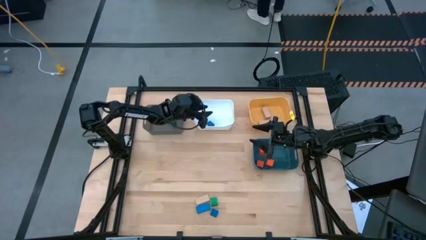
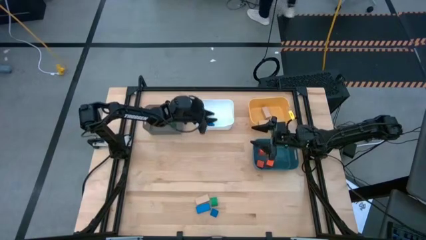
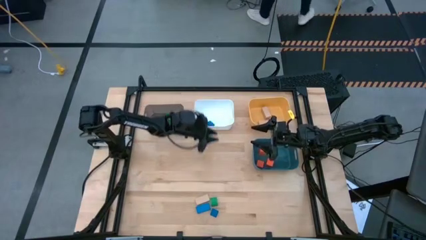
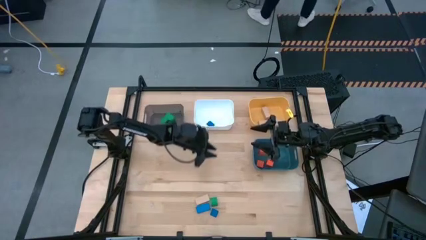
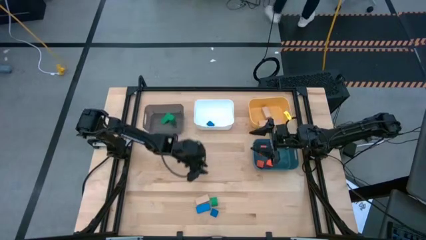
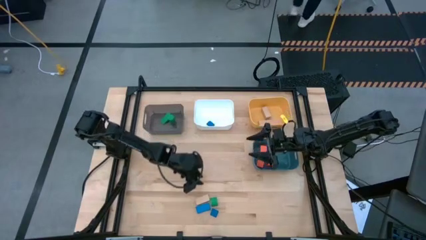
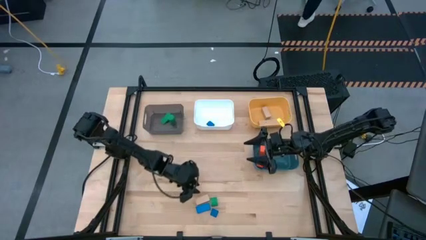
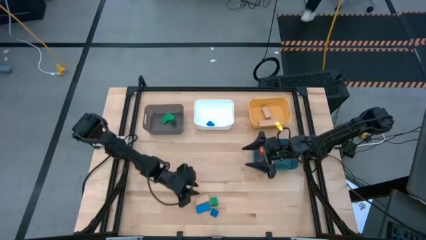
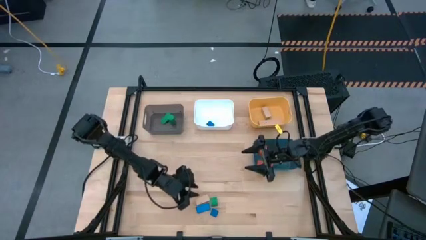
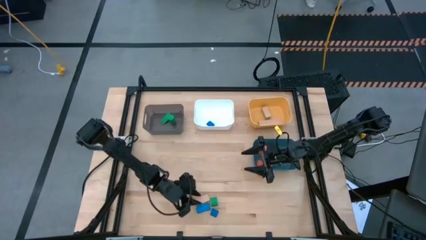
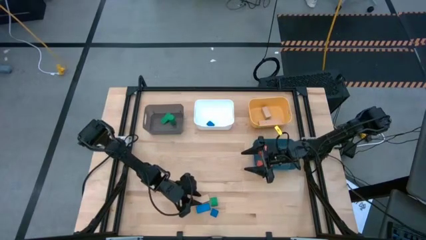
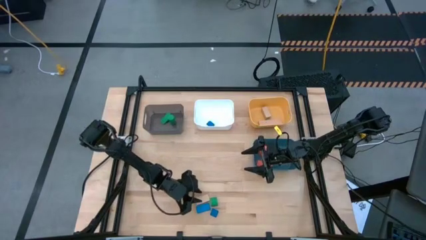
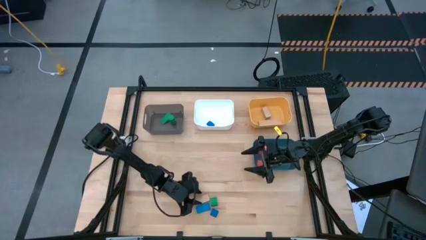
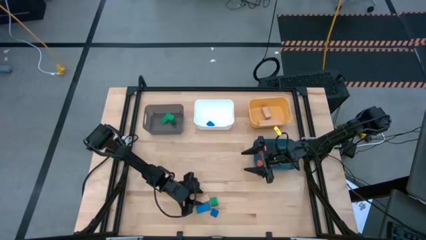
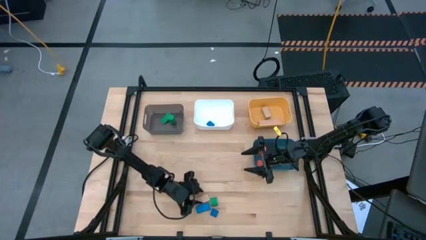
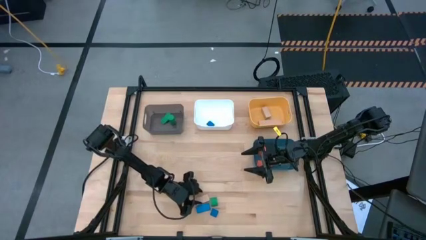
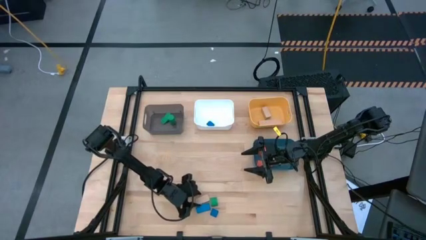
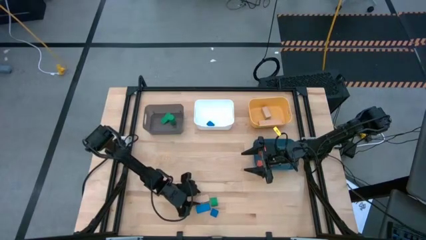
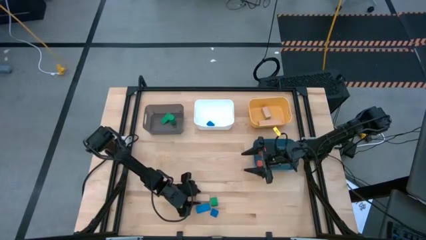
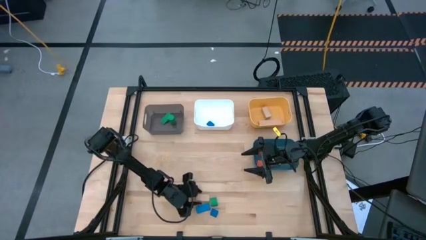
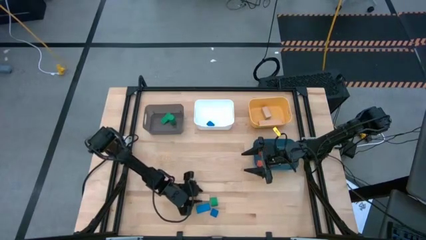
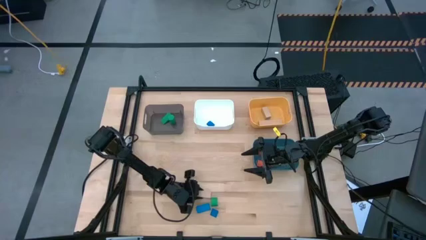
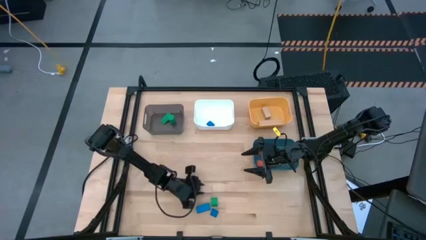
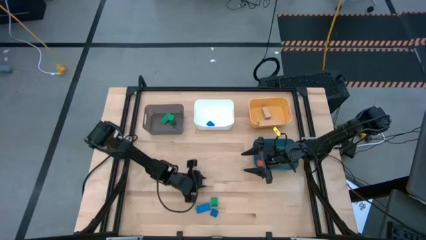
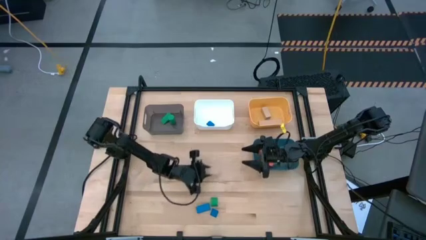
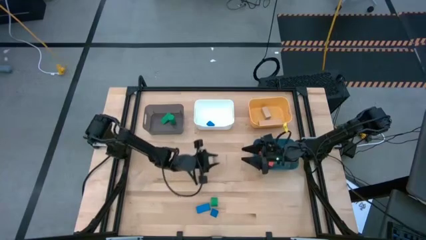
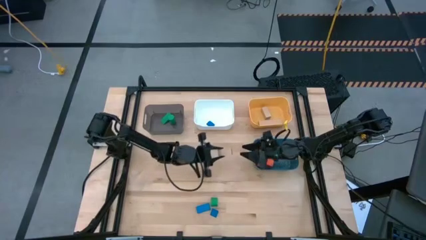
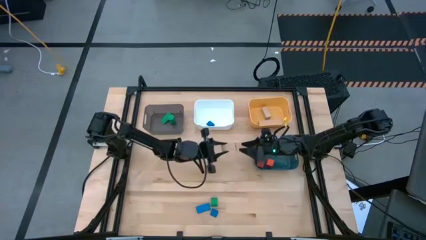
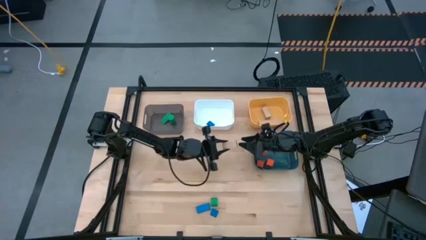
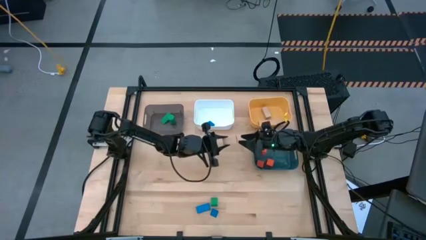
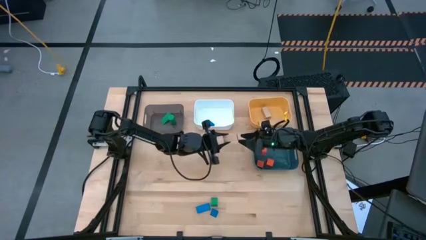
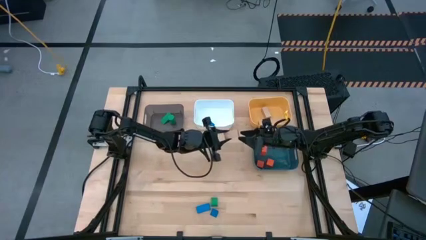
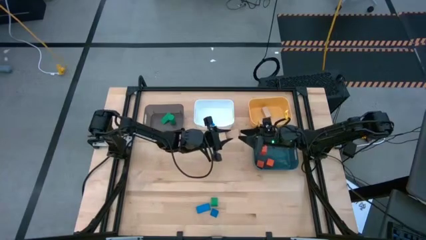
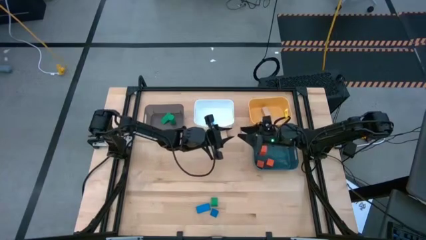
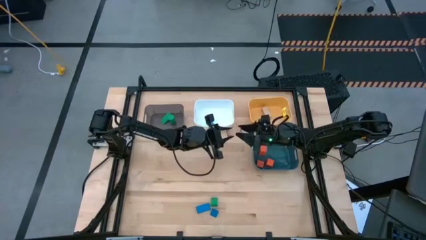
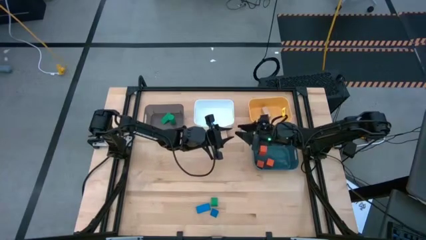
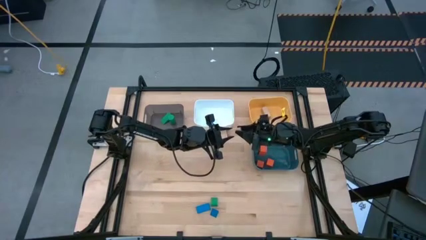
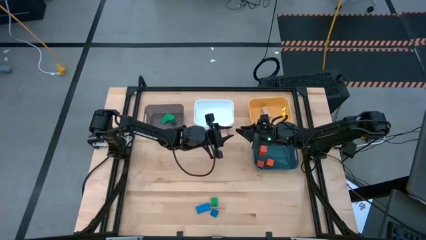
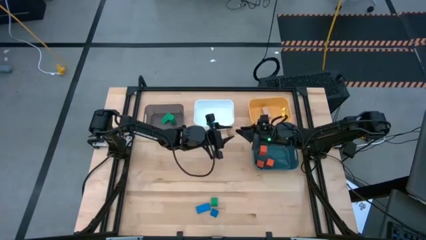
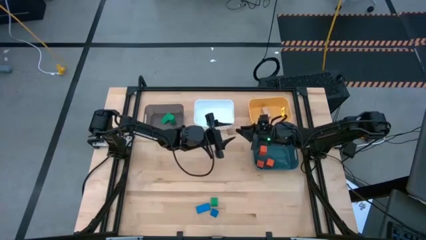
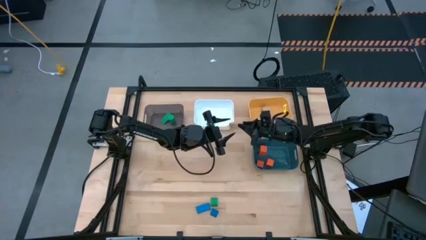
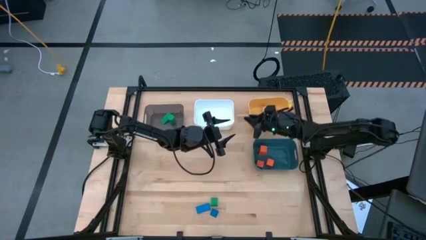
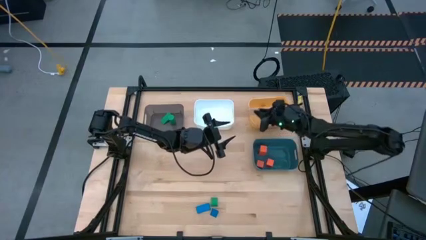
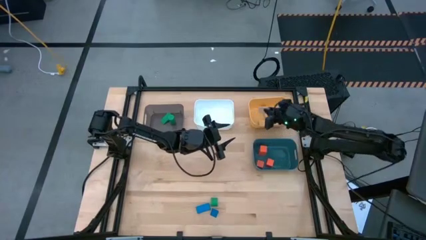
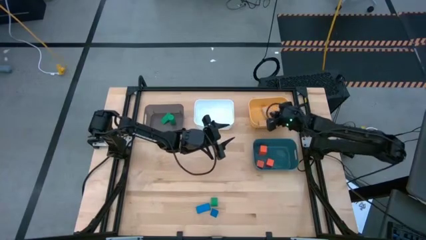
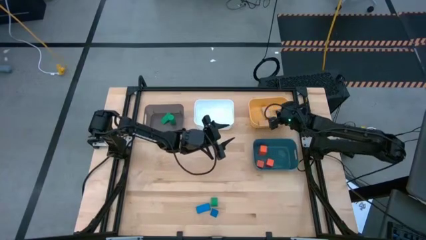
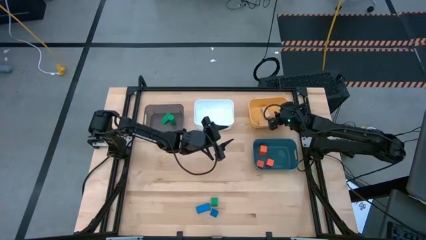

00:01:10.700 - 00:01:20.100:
Task: Sort & place blocks by color
Put the brown block into the yellow bin

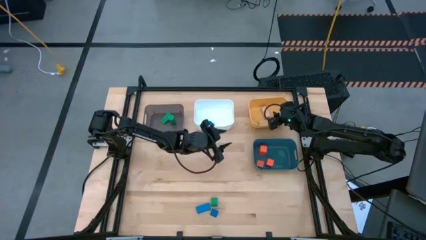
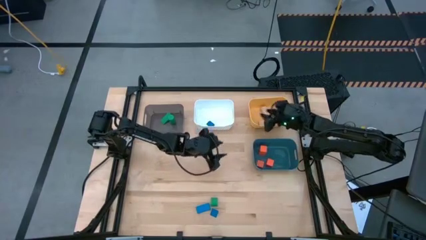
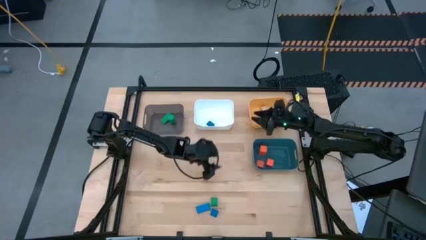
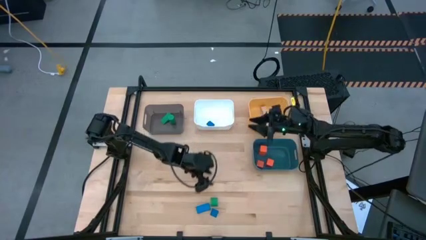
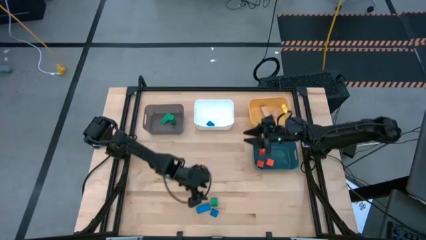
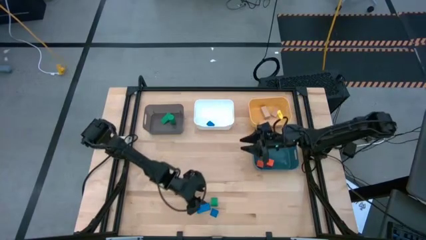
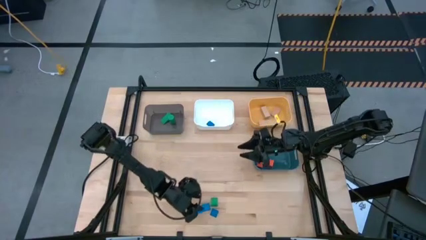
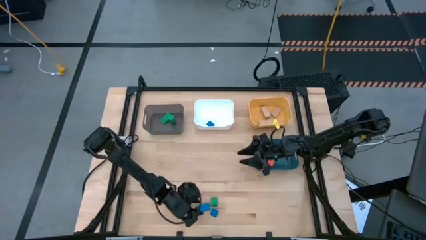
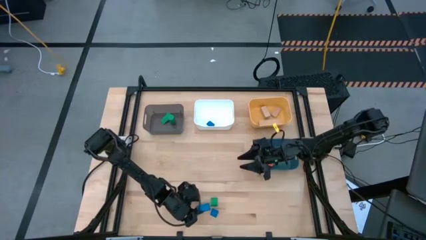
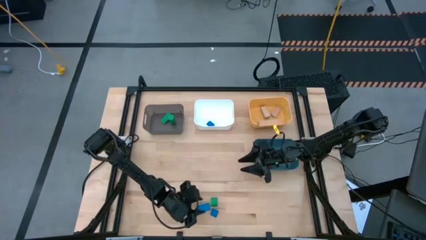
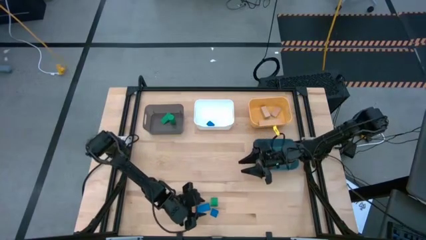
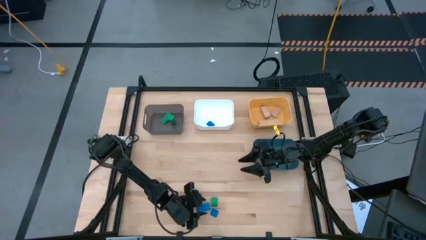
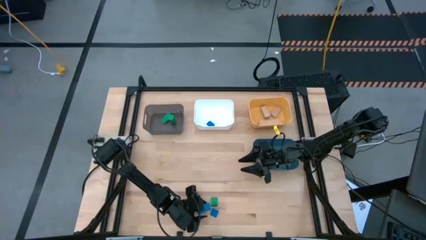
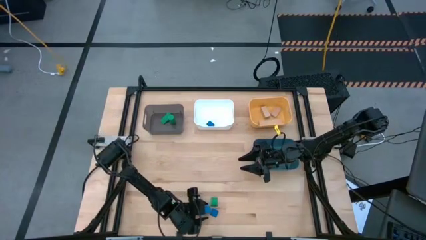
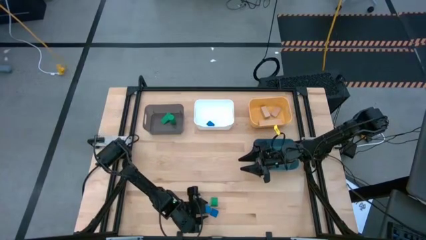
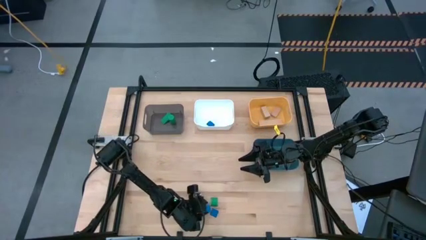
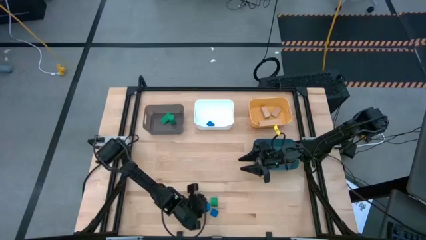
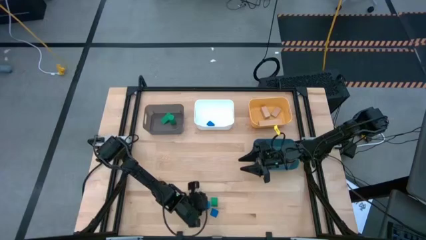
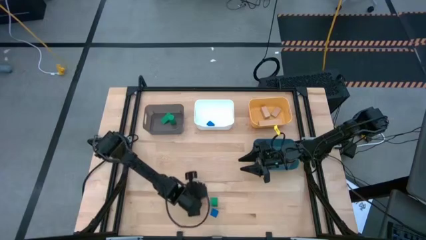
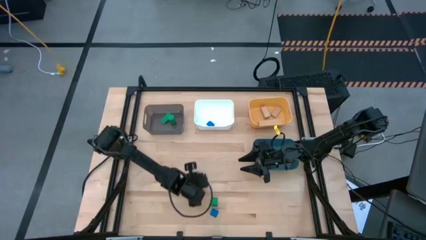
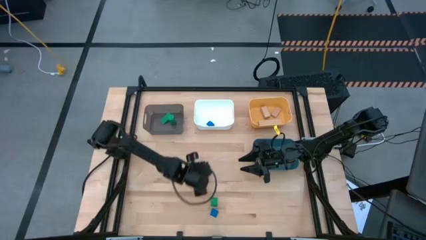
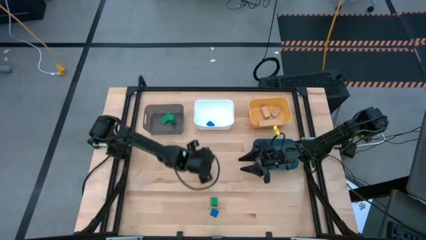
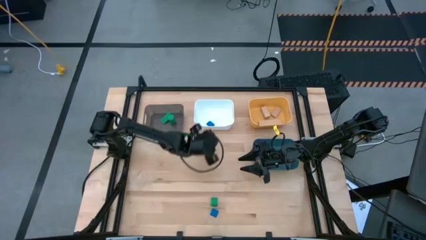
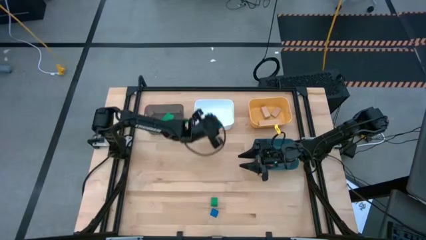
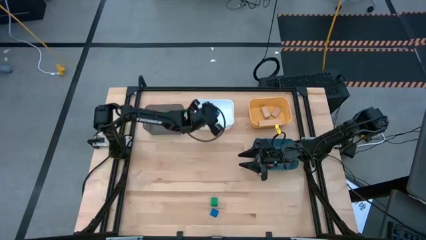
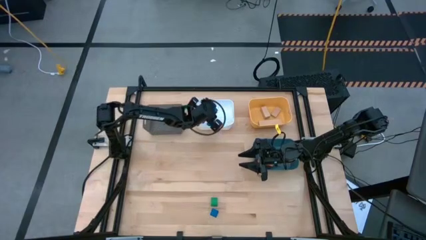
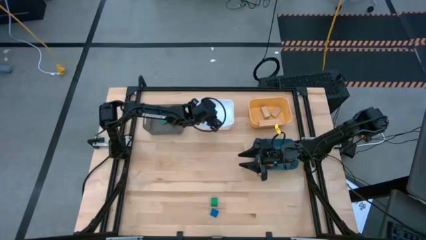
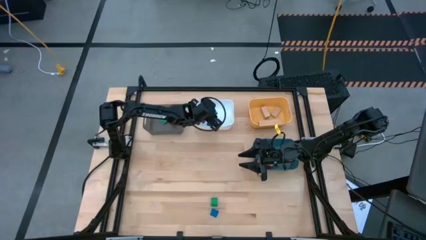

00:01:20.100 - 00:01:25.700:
Put the left blue block into the white bin
